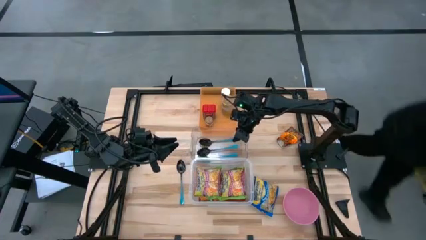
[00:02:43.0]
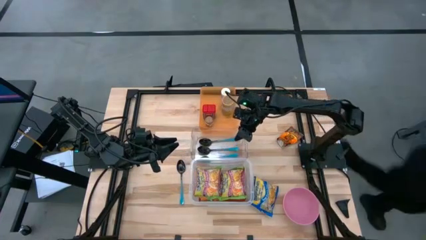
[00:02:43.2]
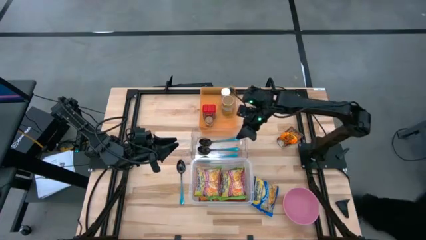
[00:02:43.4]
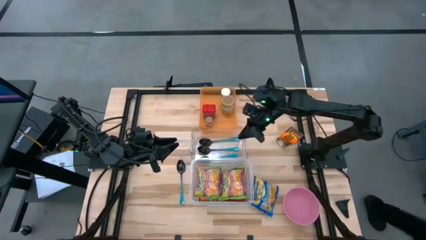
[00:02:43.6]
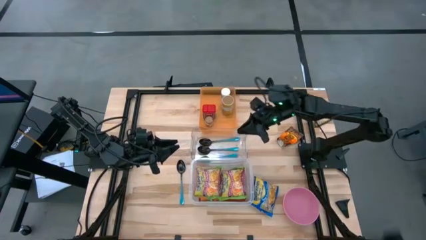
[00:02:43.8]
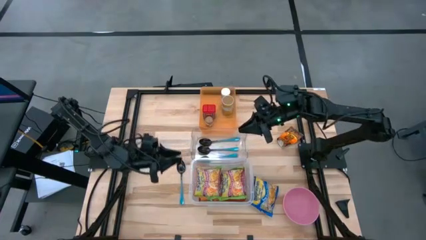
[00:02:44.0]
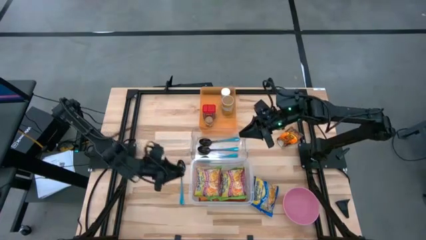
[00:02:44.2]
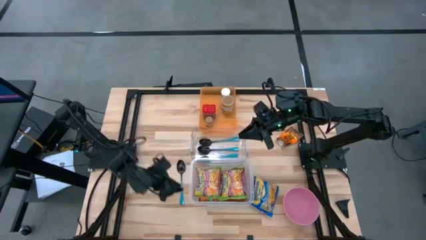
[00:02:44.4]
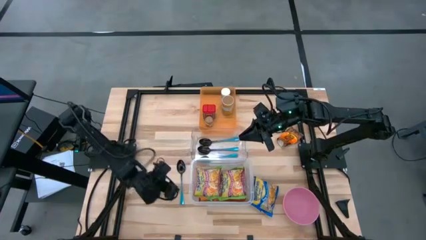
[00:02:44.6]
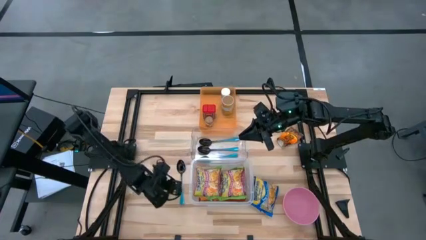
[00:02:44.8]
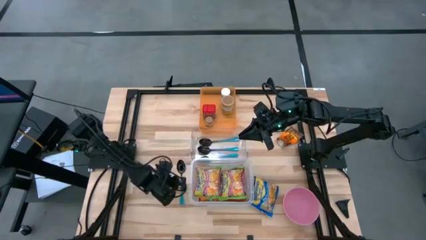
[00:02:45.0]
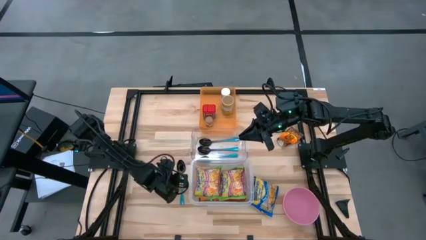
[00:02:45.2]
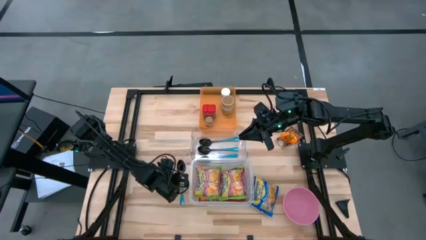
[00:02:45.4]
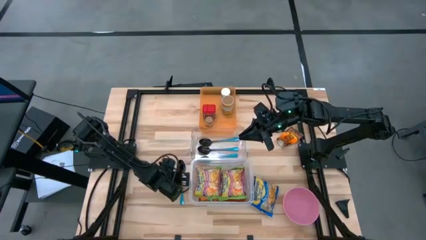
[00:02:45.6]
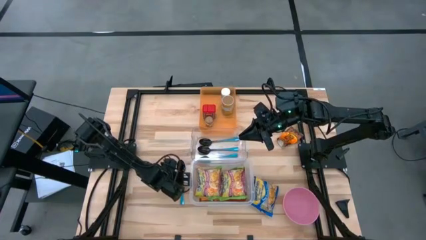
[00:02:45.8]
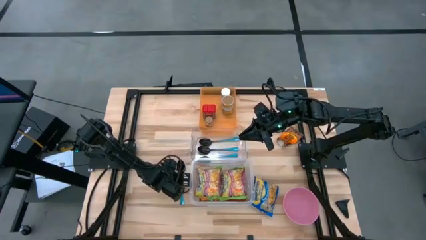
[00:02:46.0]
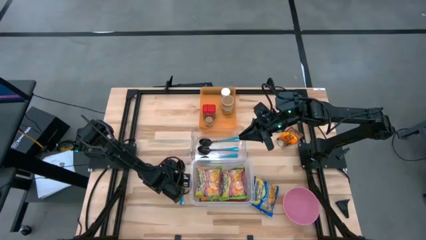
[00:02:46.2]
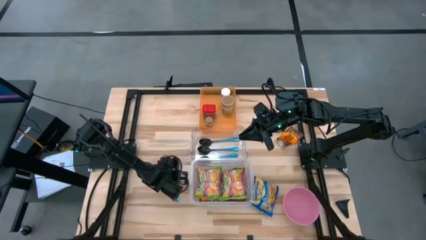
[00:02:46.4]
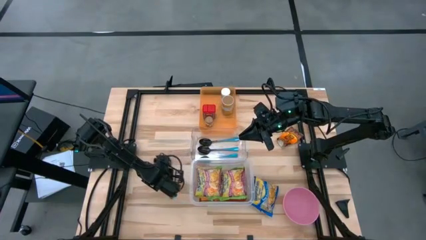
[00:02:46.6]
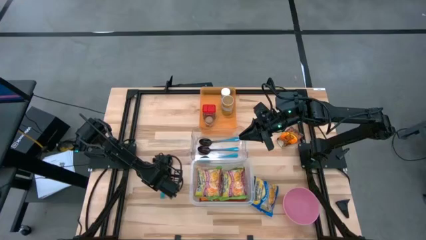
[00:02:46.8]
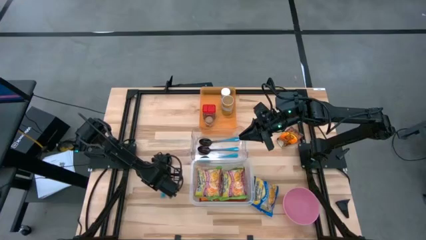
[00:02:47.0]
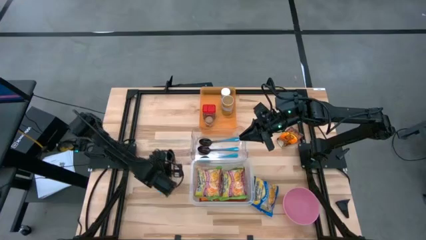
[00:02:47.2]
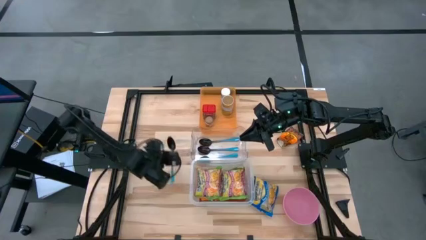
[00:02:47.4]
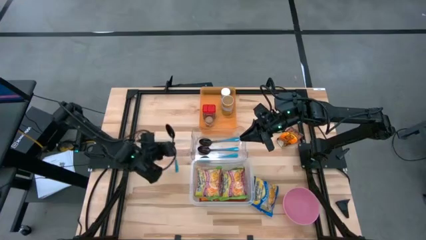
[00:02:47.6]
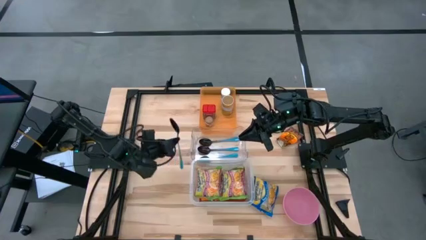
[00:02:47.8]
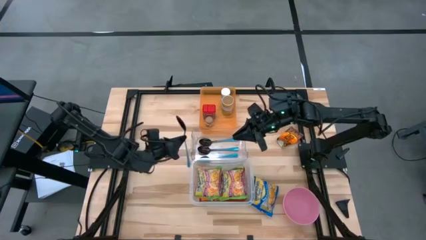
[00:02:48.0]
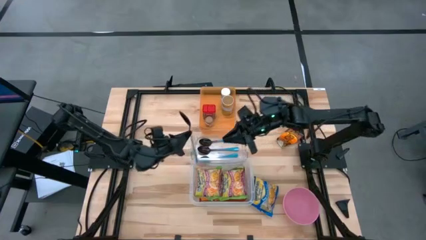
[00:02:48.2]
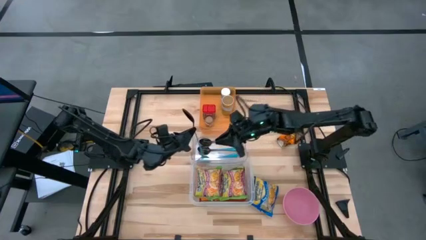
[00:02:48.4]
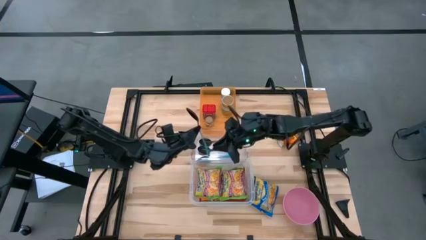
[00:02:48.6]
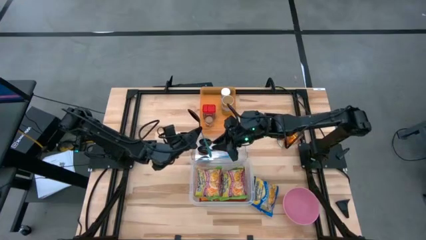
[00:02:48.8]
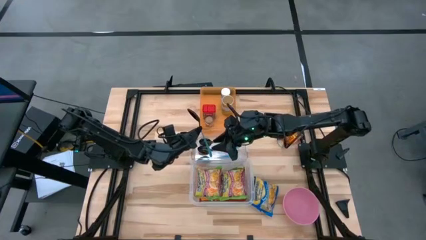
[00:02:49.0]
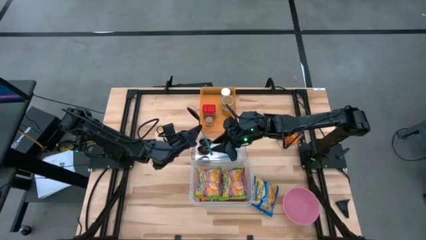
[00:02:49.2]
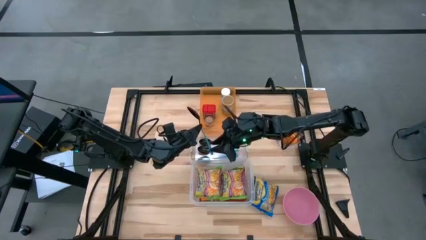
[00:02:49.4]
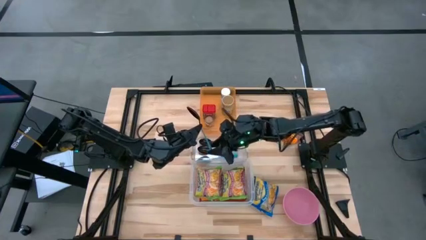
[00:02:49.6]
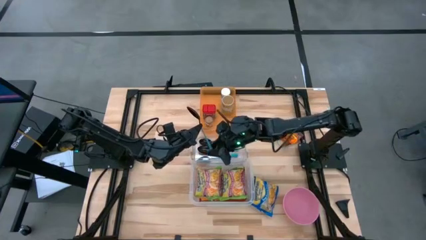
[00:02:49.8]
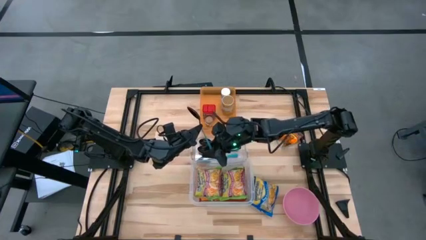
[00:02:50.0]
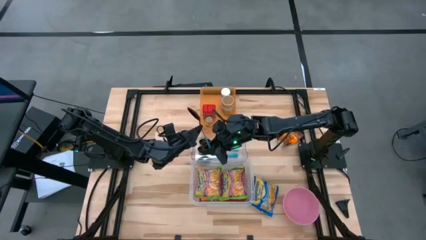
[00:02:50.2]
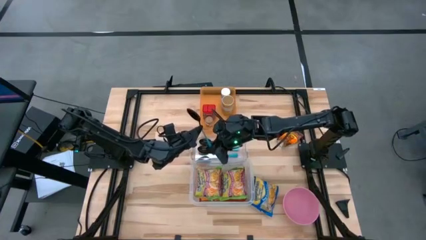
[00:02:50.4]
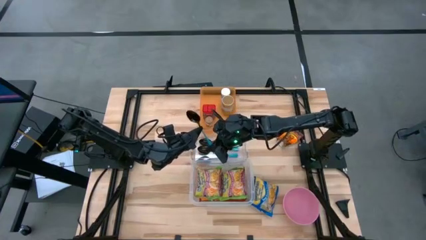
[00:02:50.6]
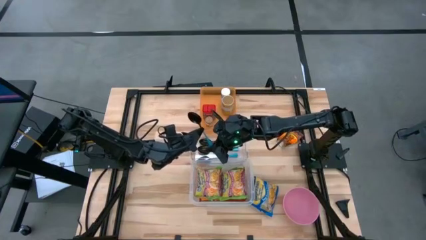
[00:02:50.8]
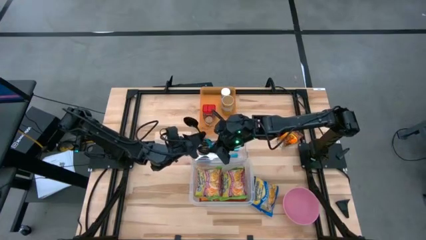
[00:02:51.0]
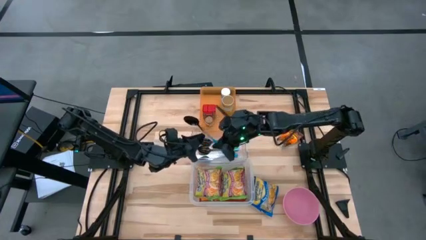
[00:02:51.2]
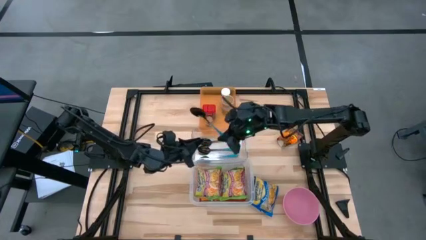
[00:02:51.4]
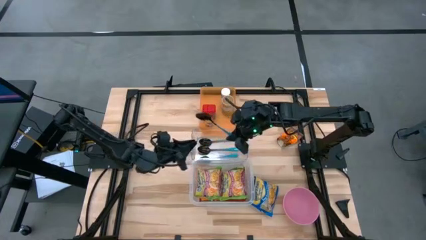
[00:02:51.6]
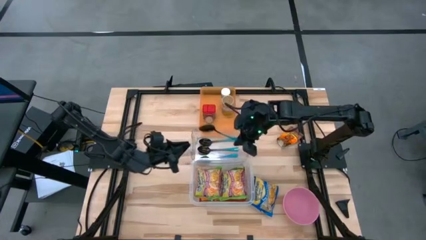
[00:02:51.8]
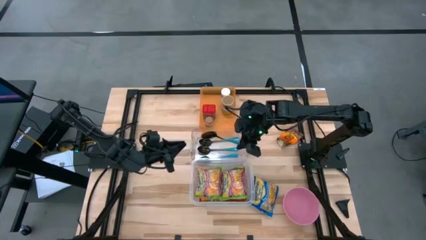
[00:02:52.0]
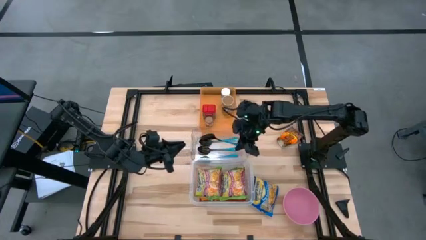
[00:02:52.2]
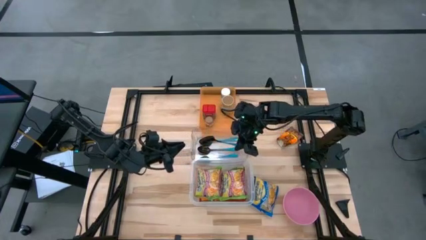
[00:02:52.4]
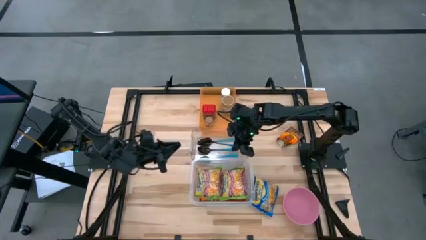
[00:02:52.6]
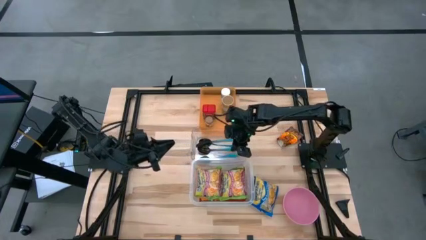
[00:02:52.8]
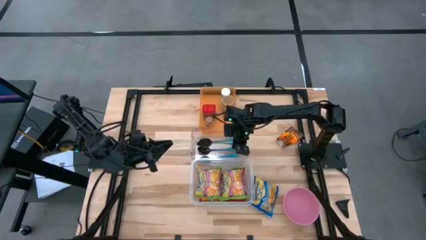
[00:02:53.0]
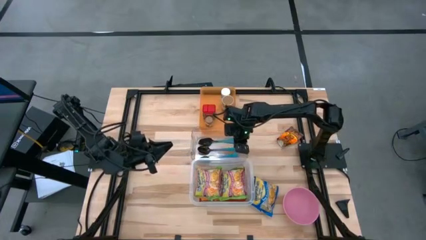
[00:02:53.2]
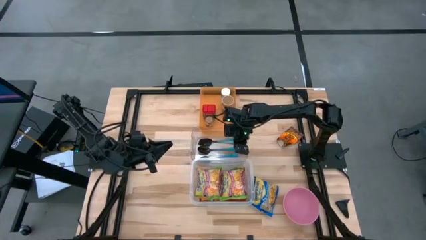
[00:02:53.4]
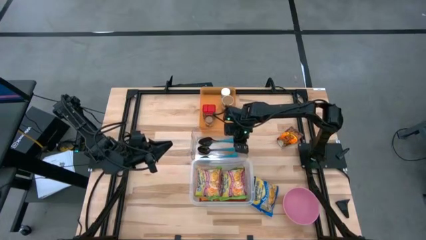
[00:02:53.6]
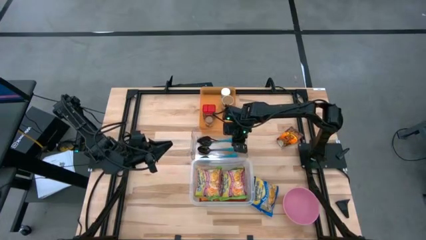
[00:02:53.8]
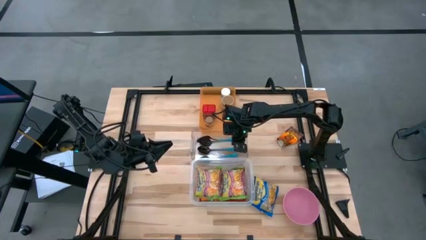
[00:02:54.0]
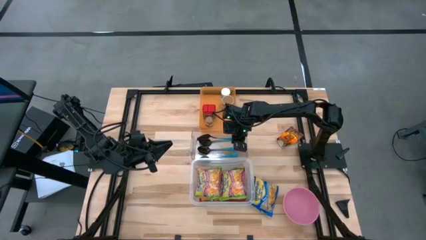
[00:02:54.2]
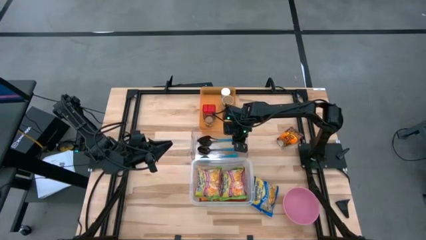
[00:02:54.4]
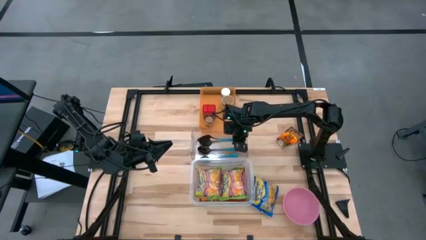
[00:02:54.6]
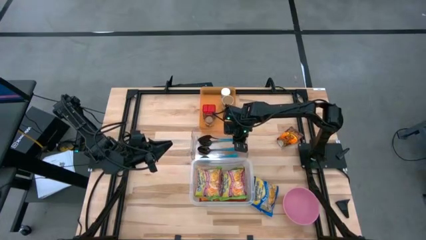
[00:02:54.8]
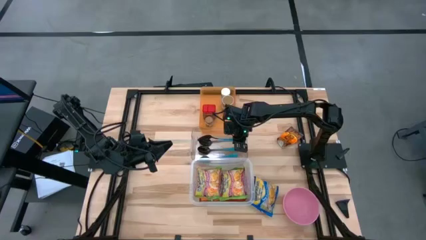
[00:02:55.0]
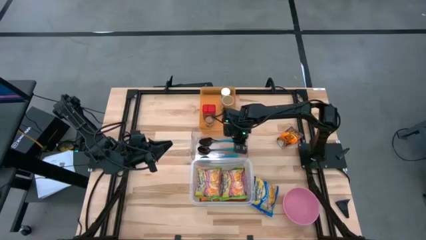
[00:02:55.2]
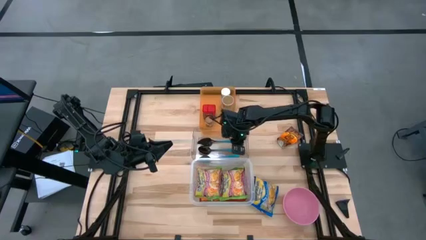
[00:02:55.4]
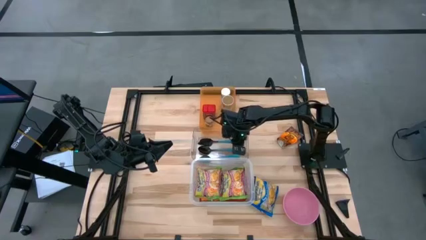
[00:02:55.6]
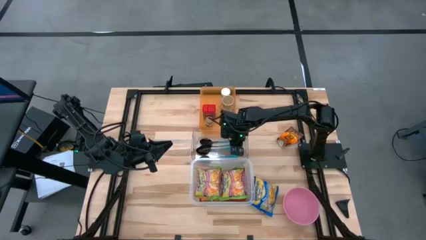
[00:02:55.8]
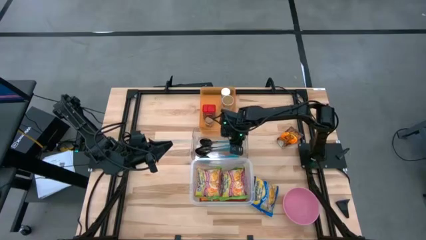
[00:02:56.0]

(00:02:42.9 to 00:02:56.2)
Task: Pick & Place Food Item
Put the blue spoon into the transparent bin
